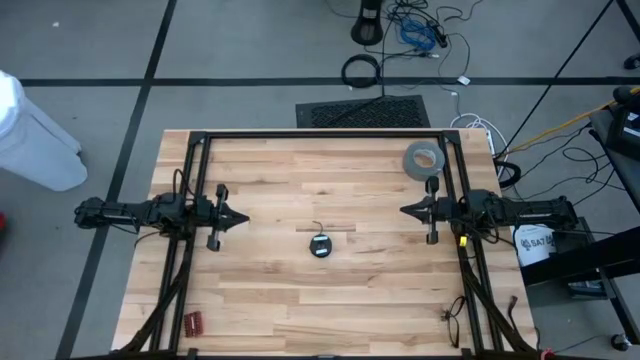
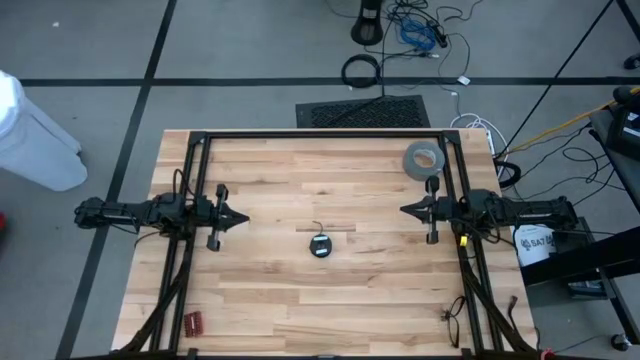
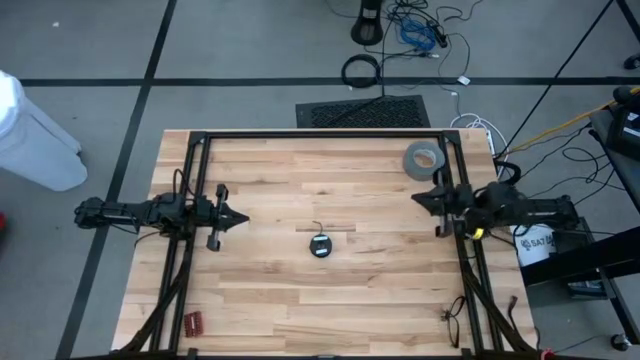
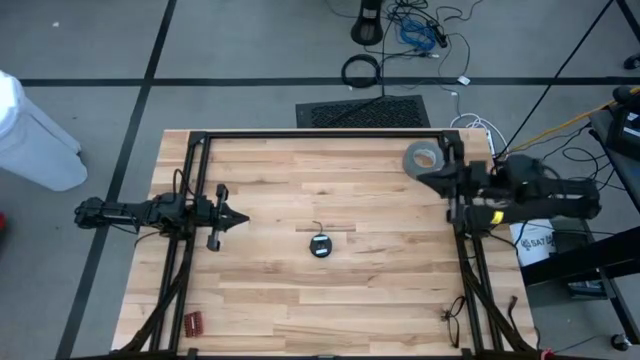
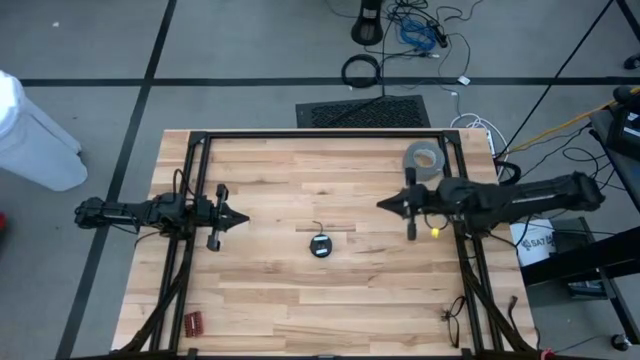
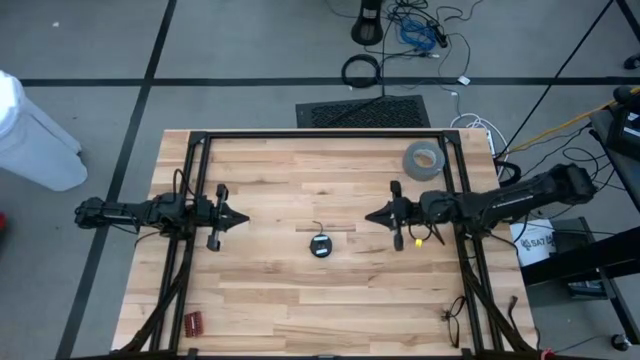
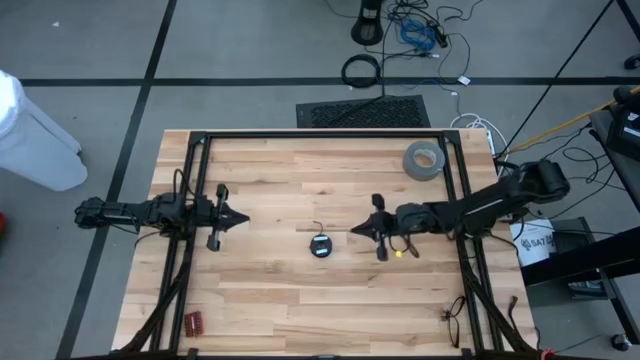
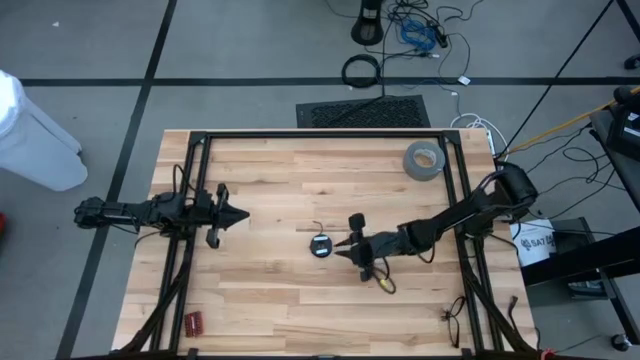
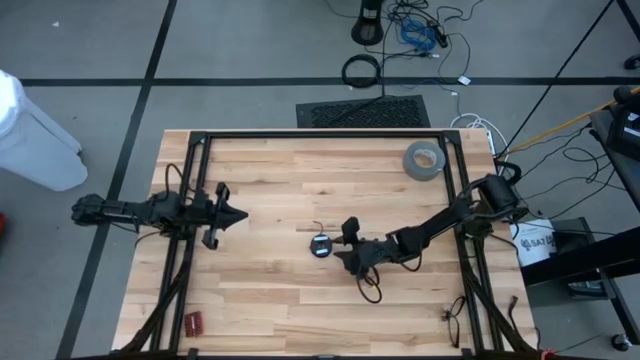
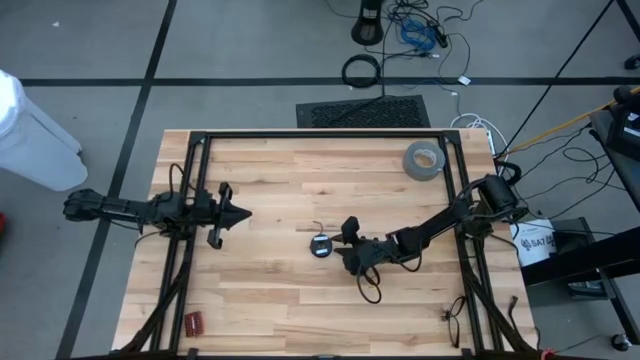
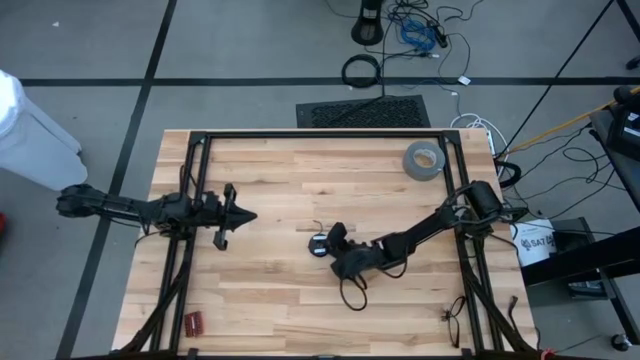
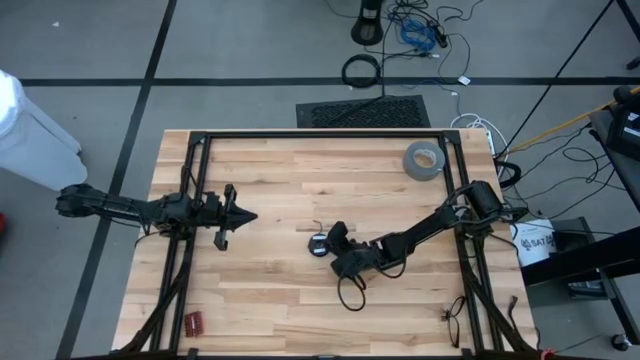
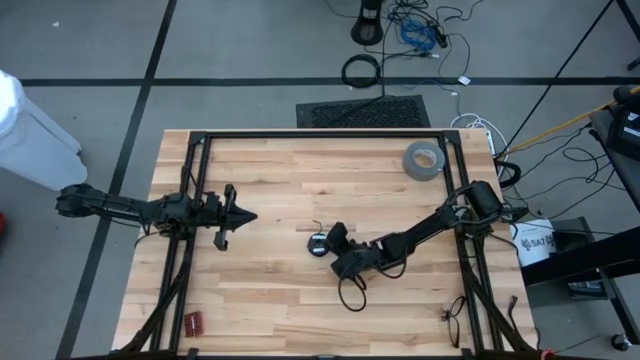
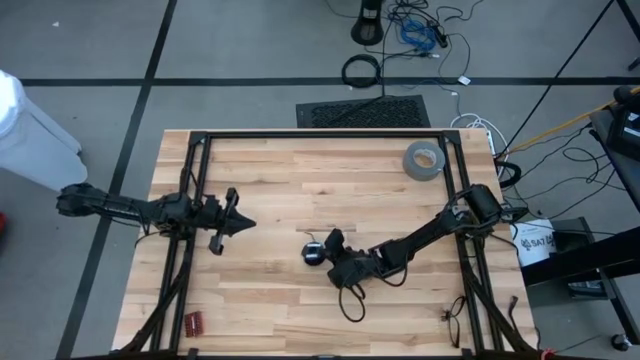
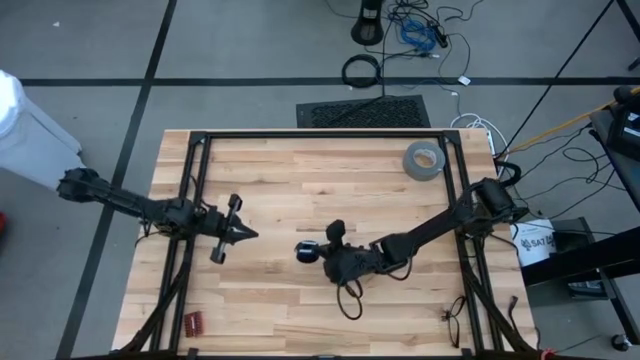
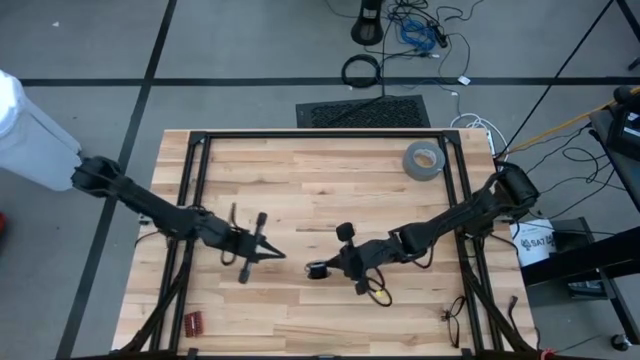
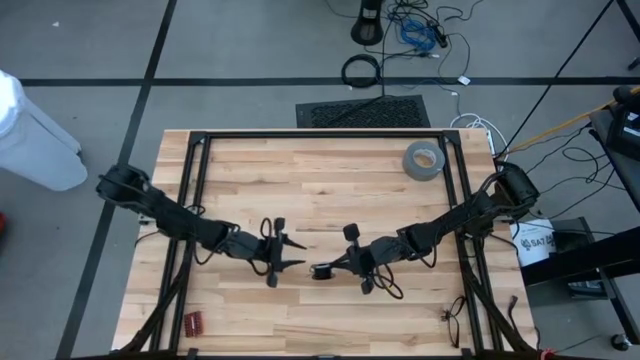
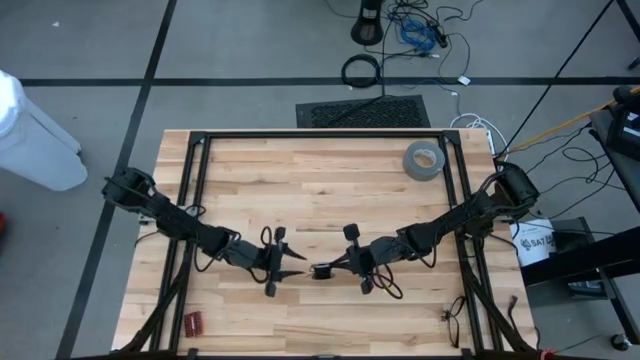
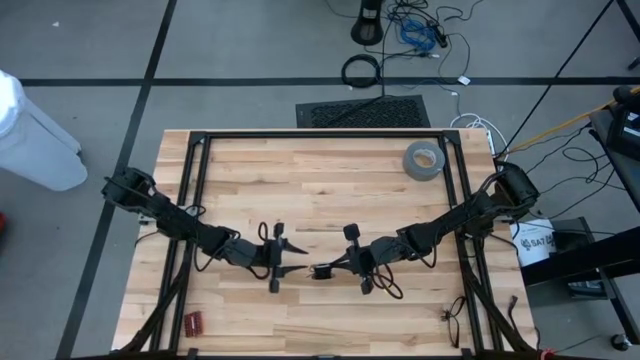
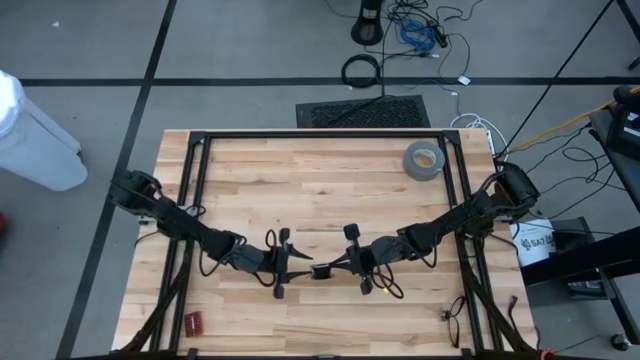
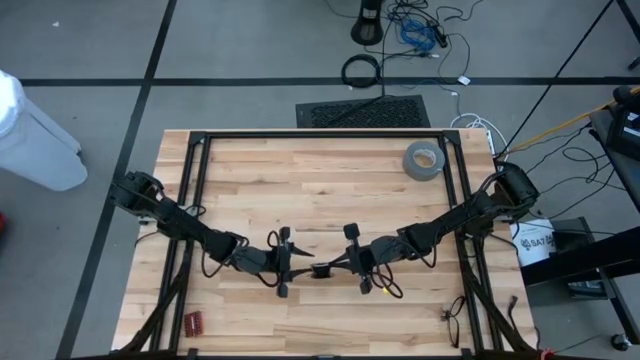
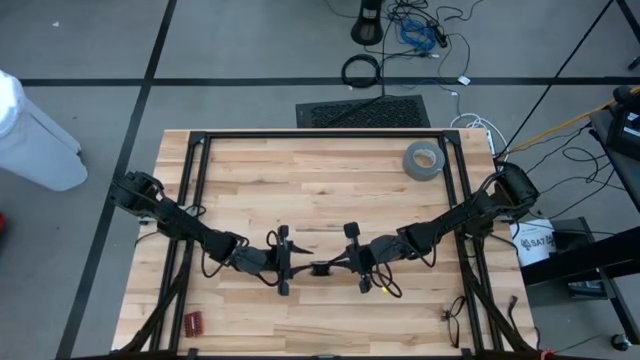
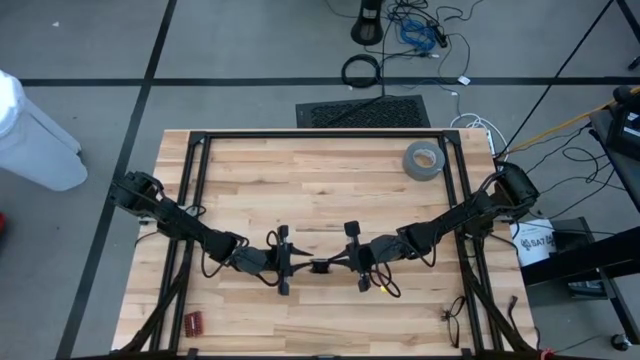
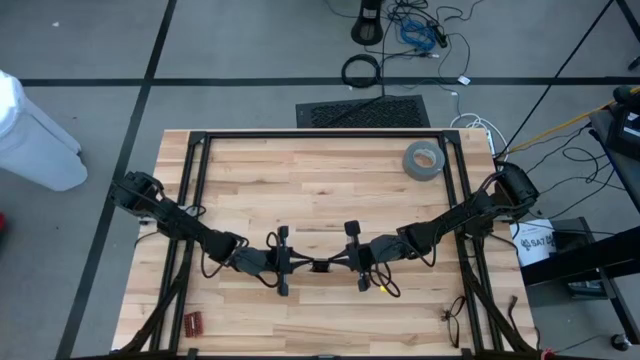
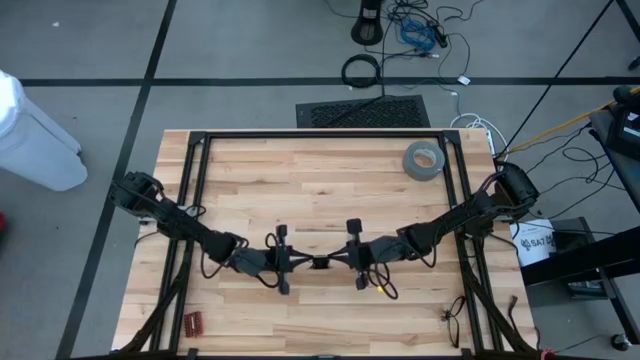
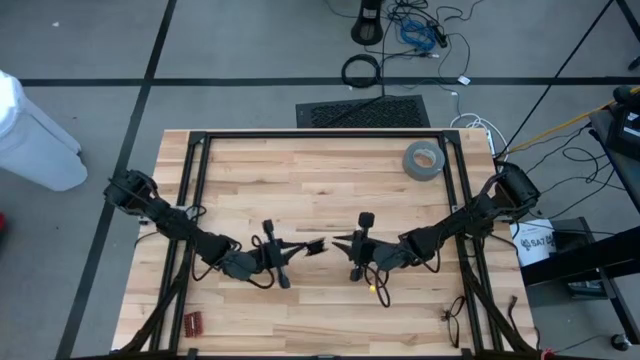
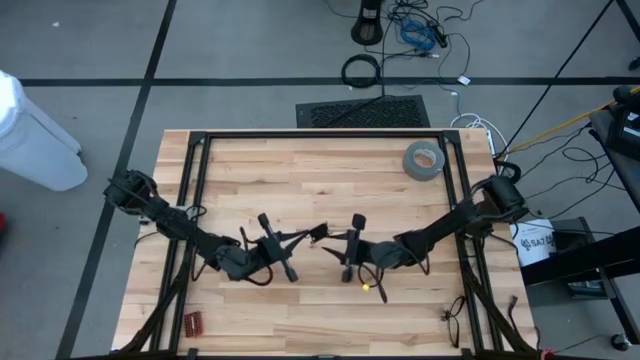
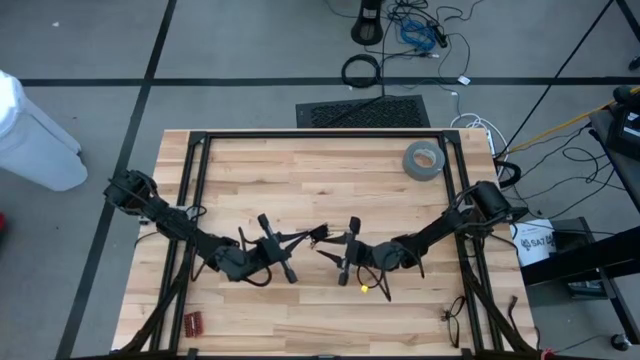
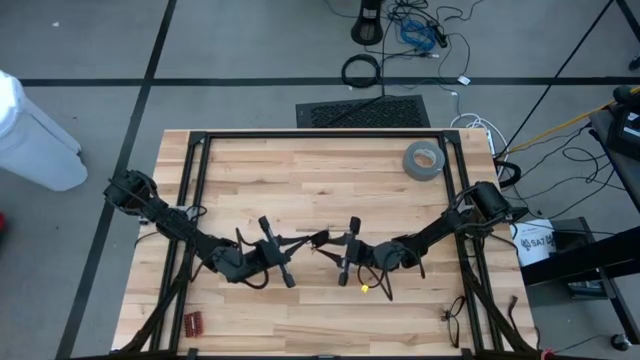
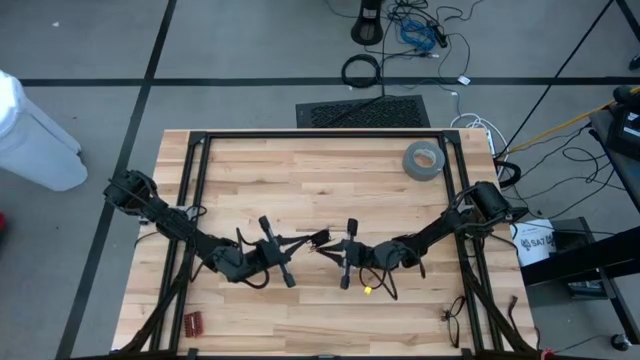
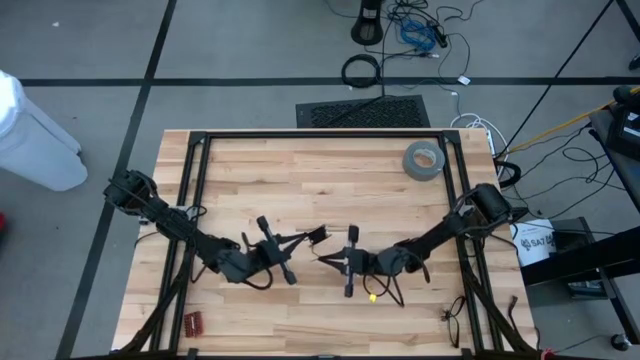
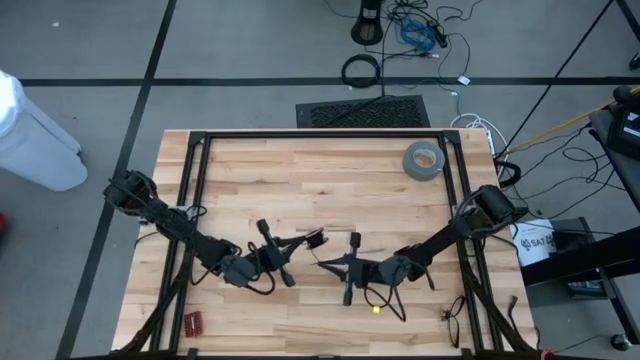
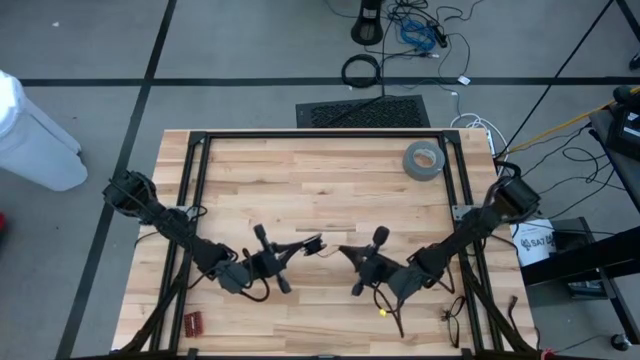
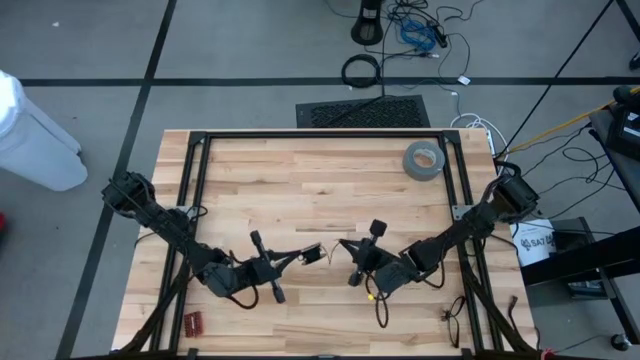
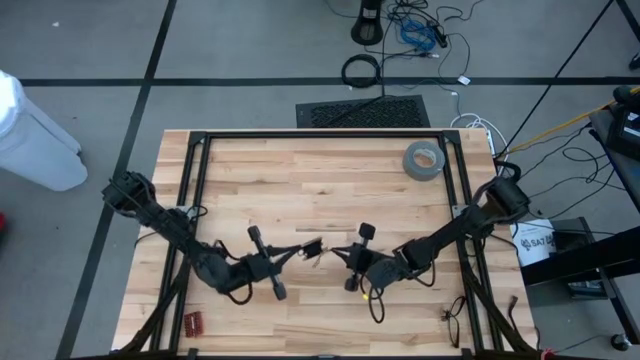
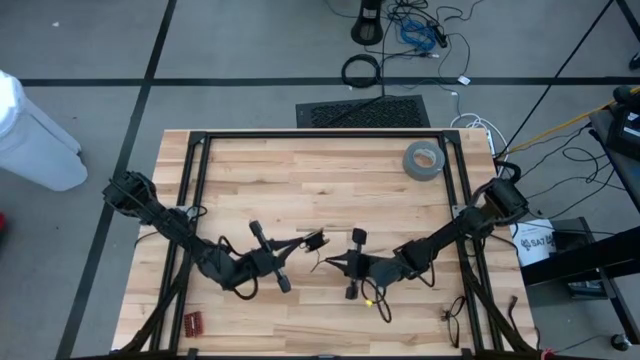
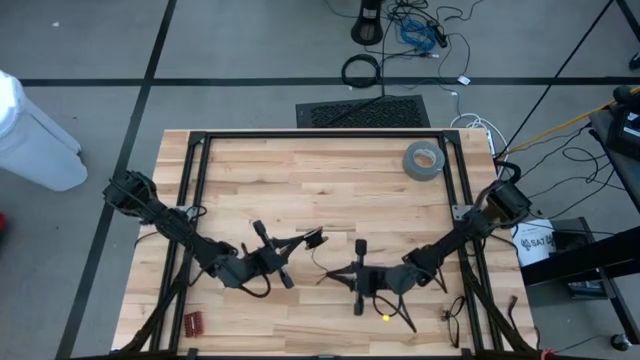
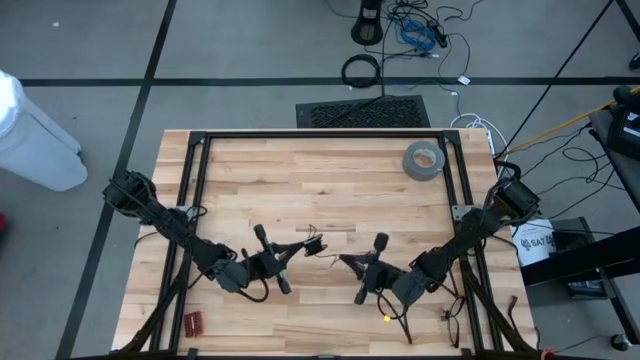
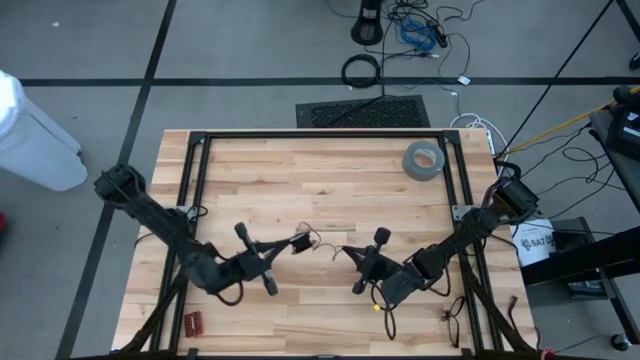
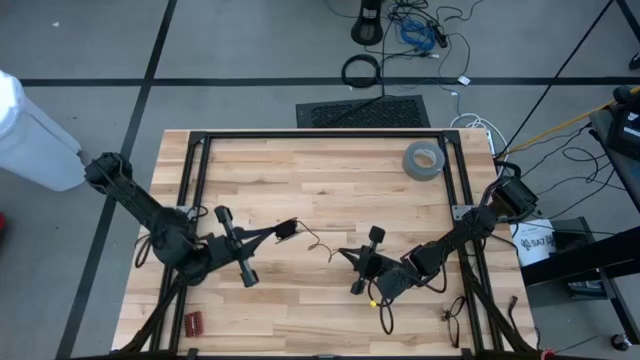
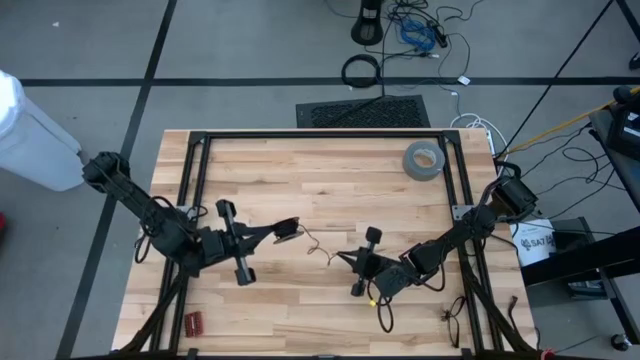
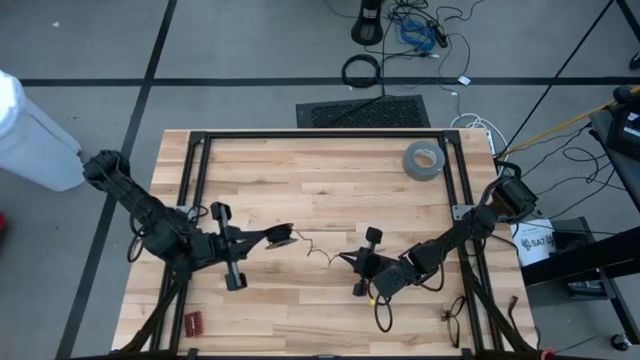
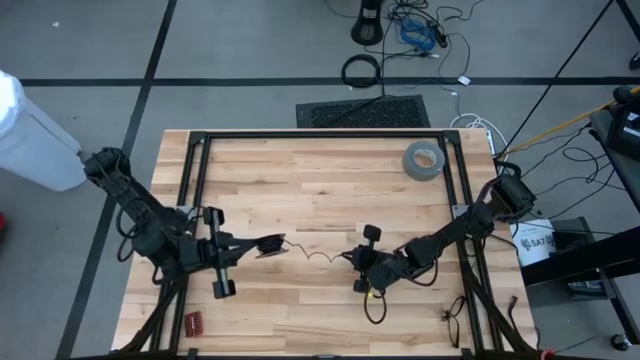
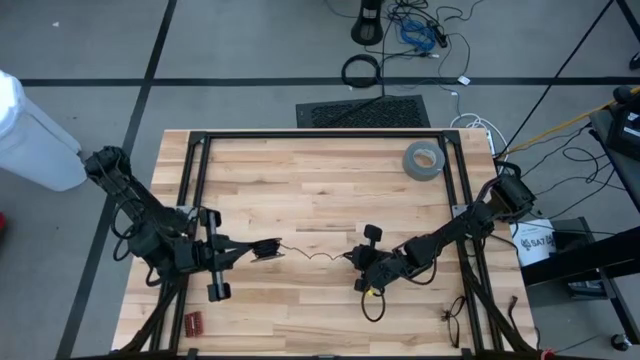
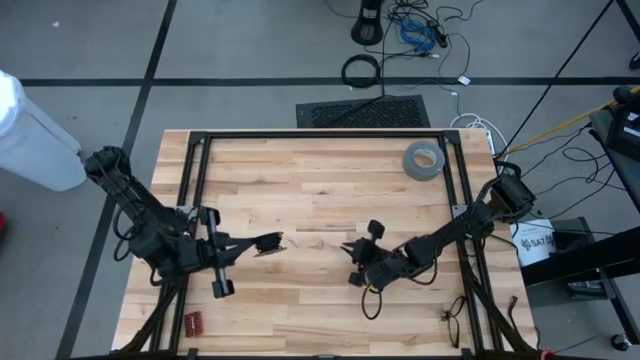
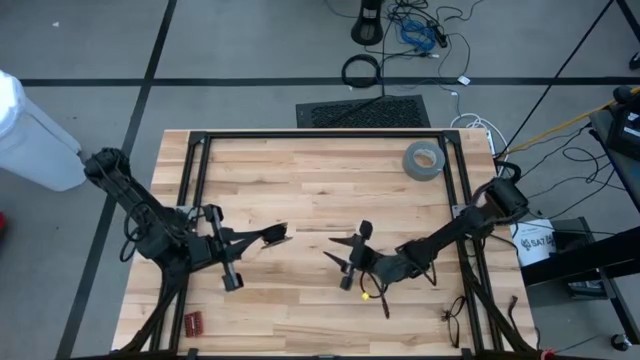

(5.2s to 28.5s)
Task: Coil cords
Uncoil the black wire from the spool
